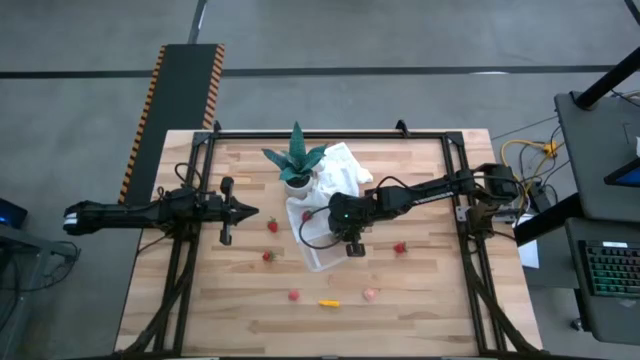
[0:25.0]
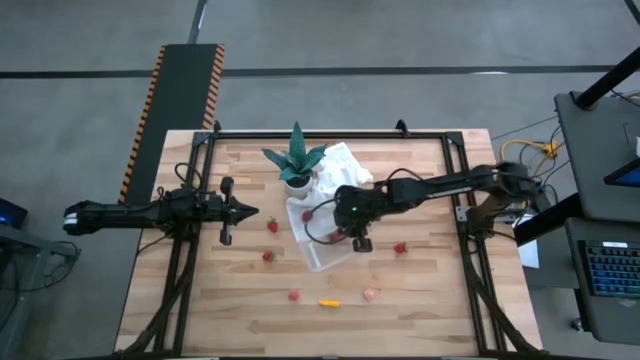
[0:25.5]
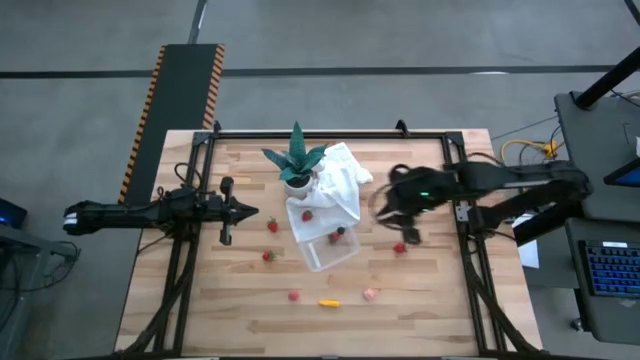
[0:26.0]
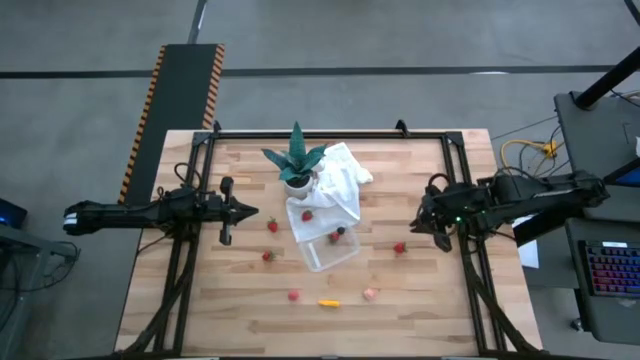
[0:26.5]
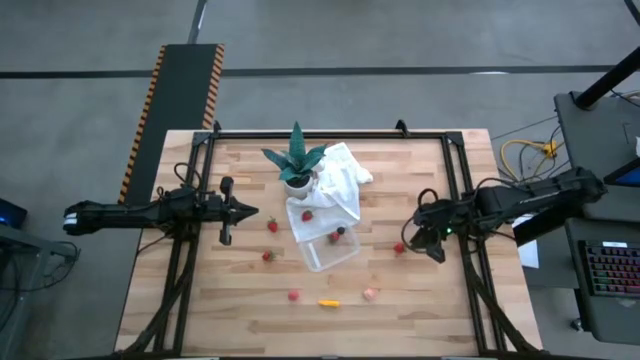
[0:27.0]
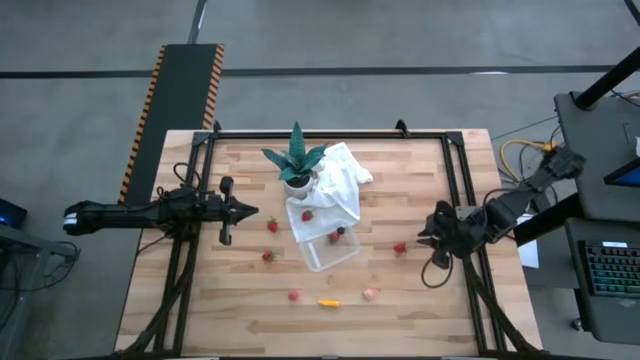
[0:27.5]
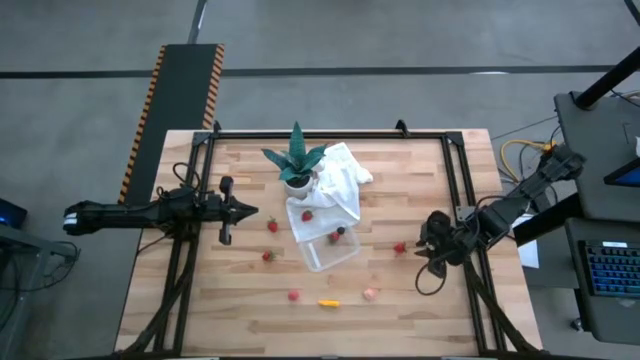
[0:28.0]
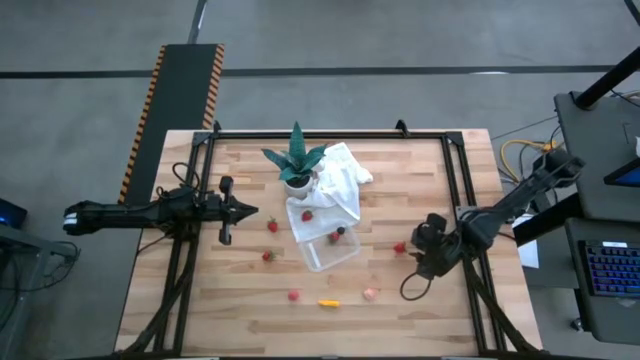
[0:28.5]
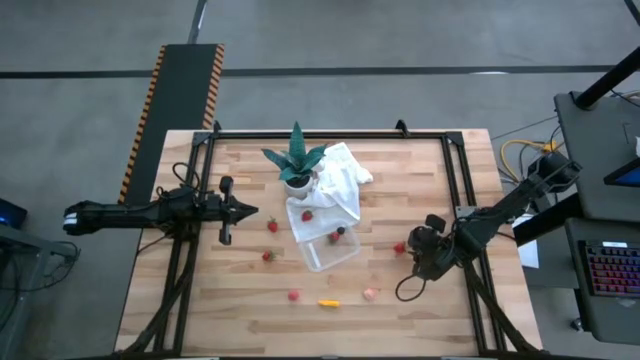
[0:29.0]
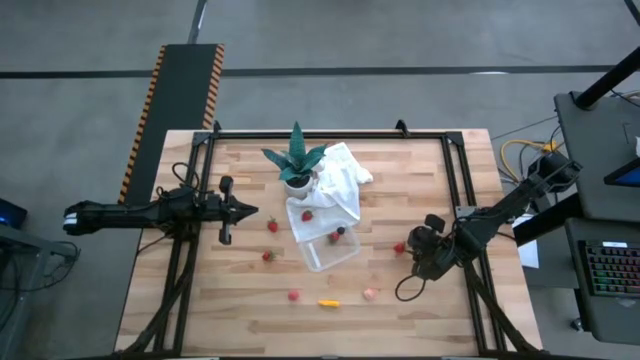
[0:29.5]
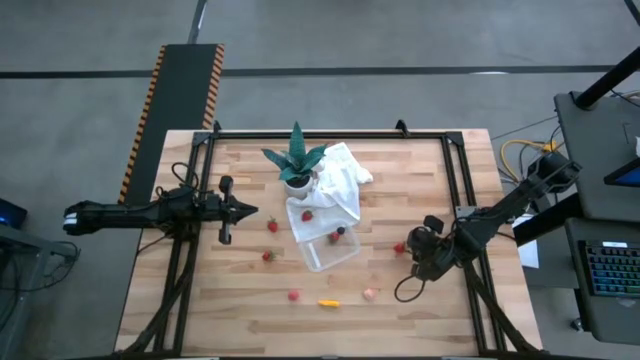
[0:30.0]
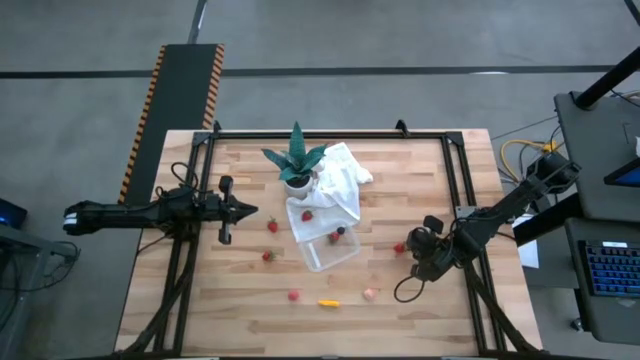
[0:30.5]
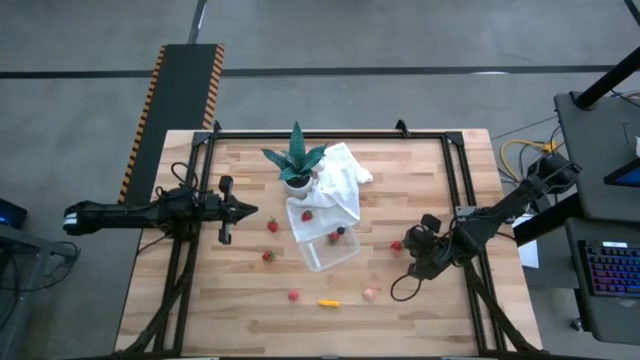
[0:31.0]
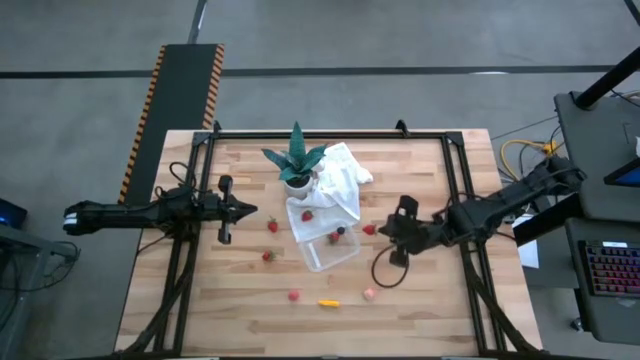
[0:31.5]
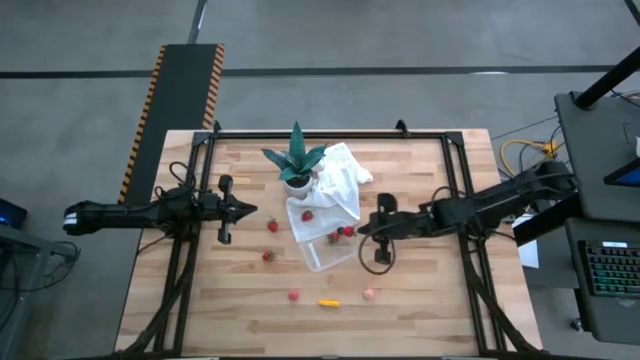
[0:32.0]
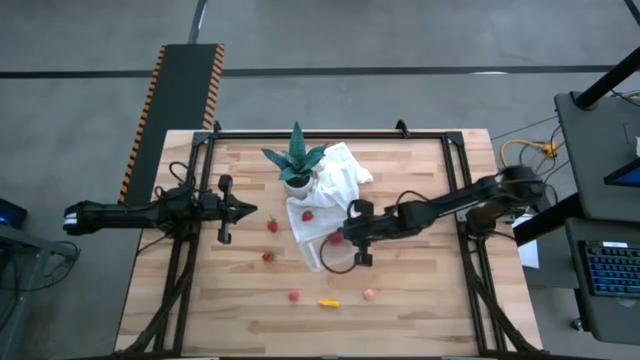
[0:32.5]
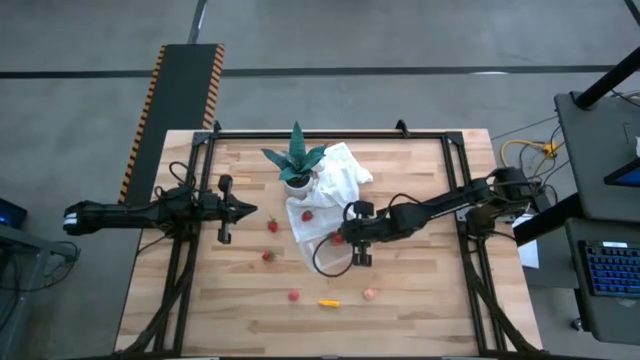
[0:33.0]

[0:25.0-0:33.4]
Task: Pick and placing Produce into tupperware
Put the strawberry into the transparent bin

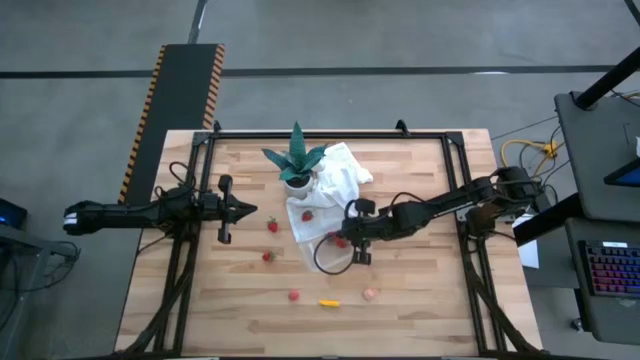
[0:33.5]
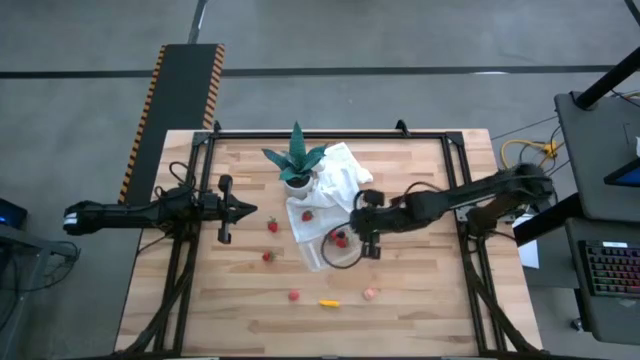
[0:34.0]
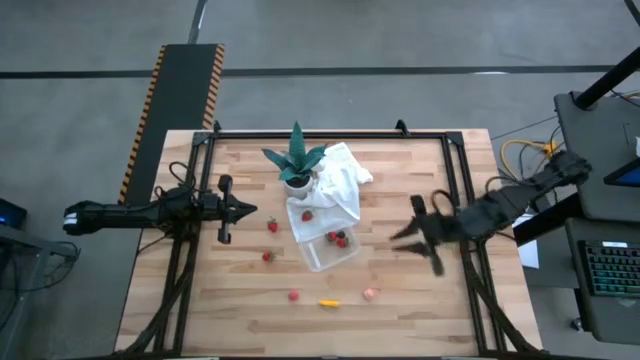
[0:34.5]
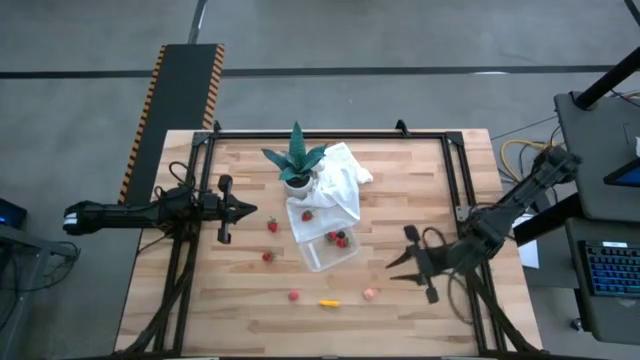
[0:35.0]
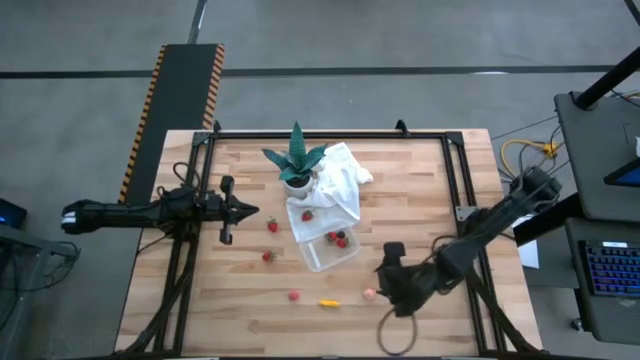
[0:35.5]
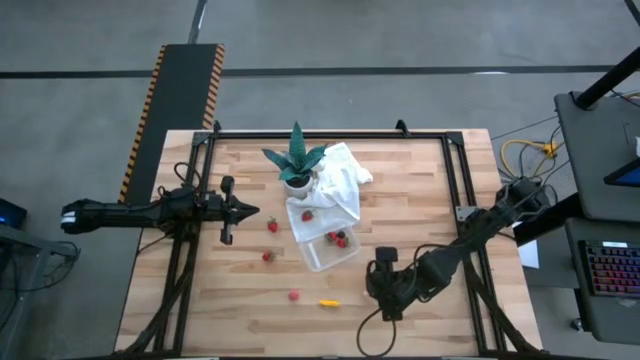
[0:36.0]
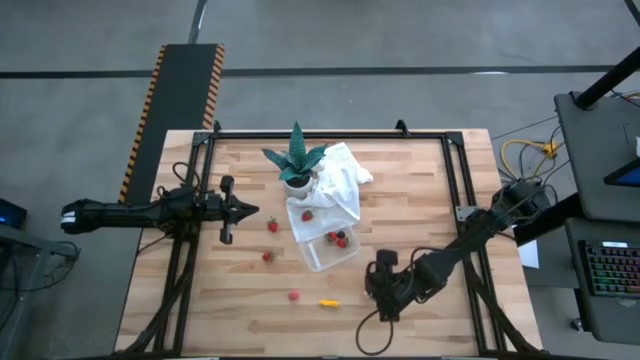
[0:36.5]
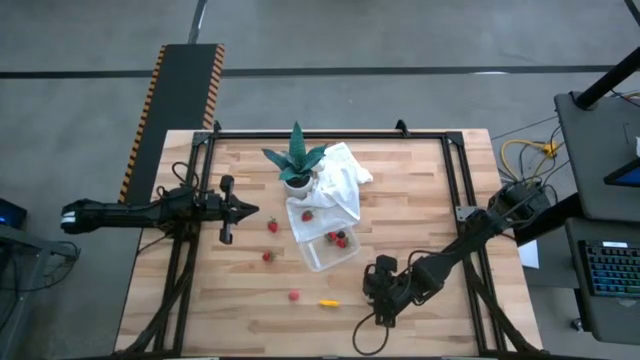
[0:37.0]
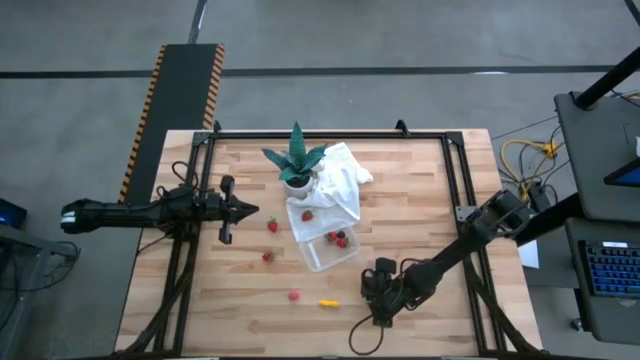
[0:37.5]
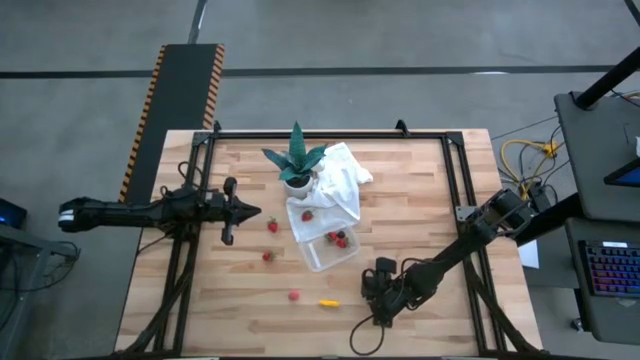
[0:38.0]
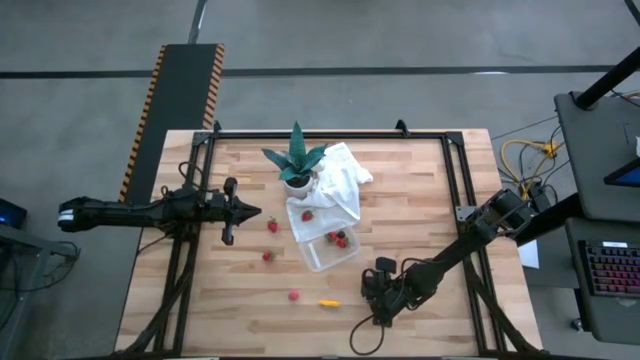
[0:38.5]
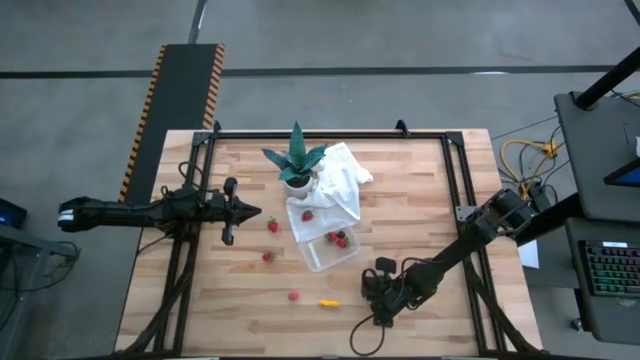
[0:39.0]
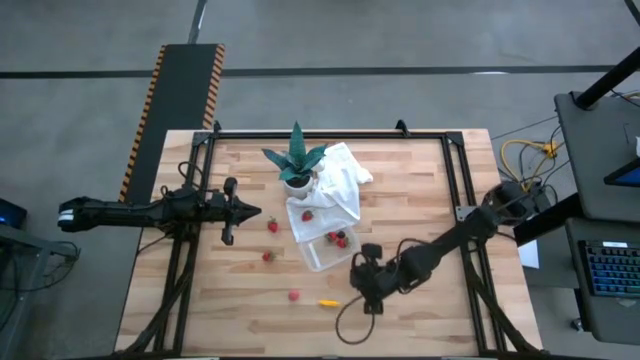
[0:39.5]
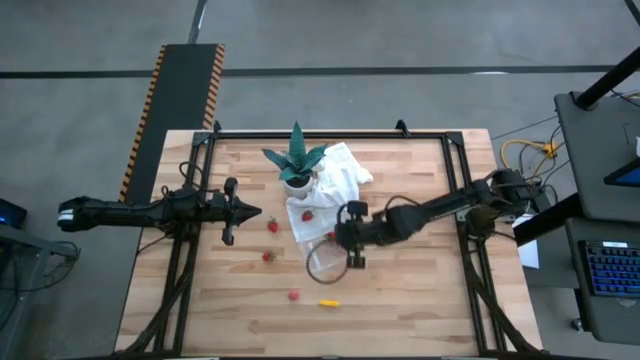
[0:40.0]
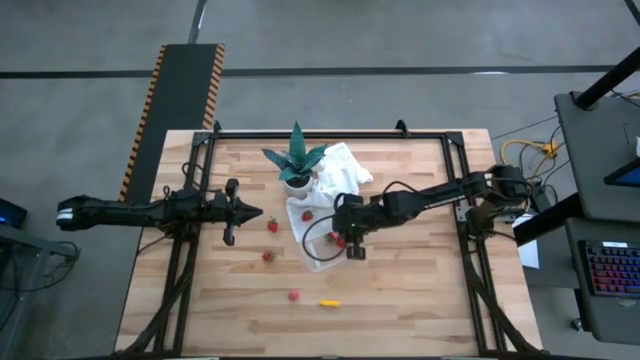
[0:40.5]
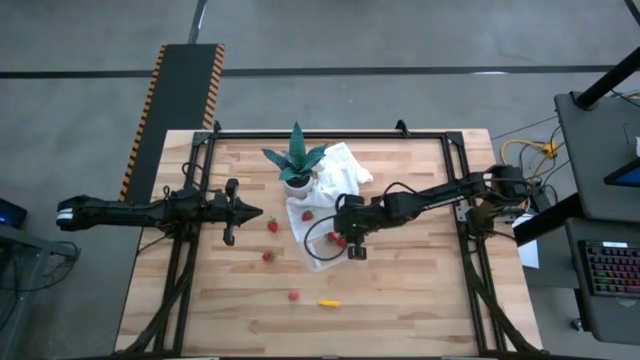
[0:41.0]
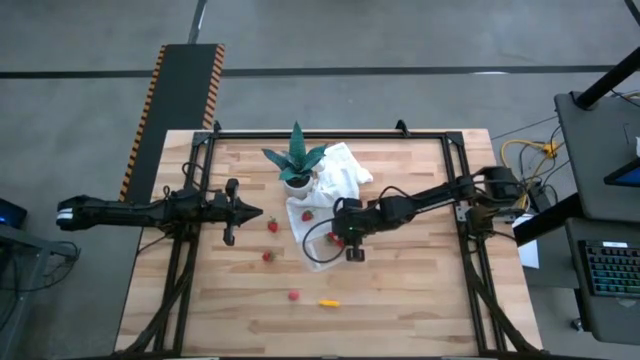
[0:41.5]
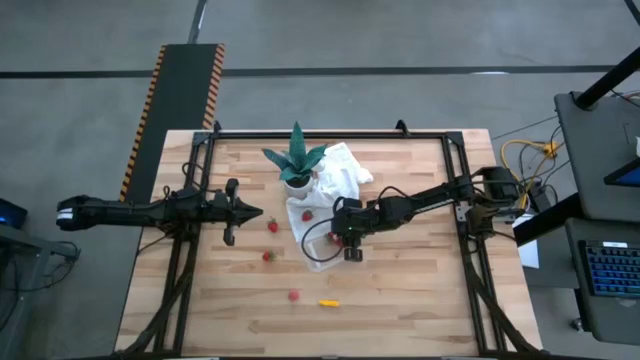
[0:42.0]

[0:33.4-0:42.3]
Put the apricot into the transparent bin

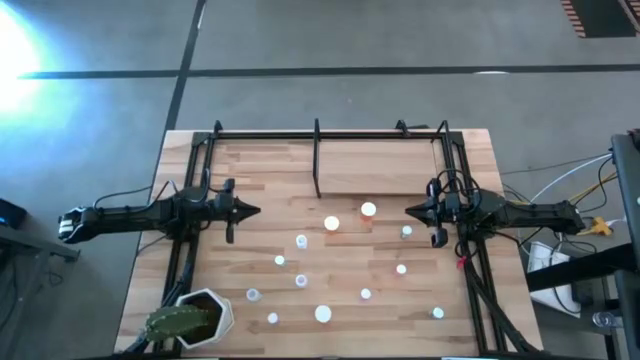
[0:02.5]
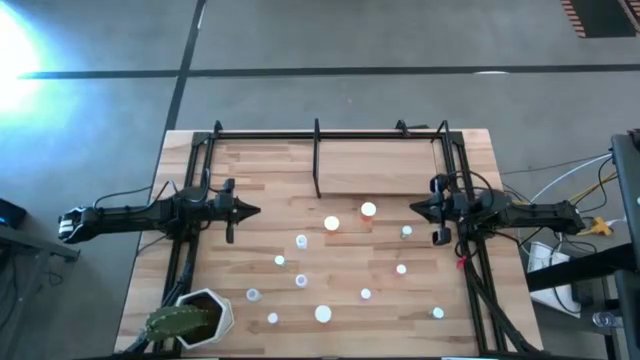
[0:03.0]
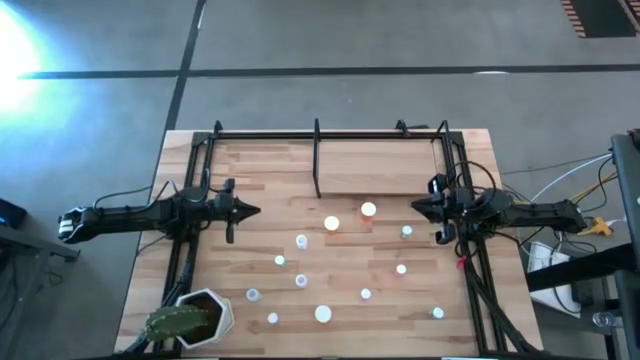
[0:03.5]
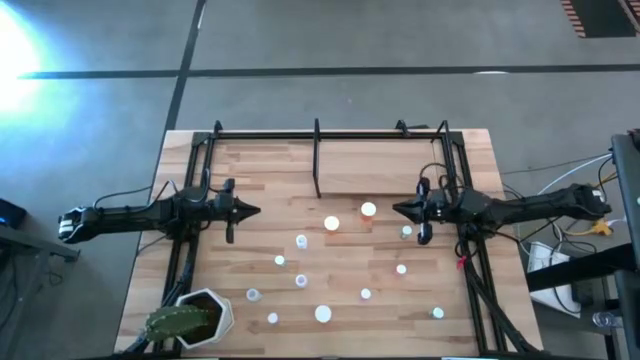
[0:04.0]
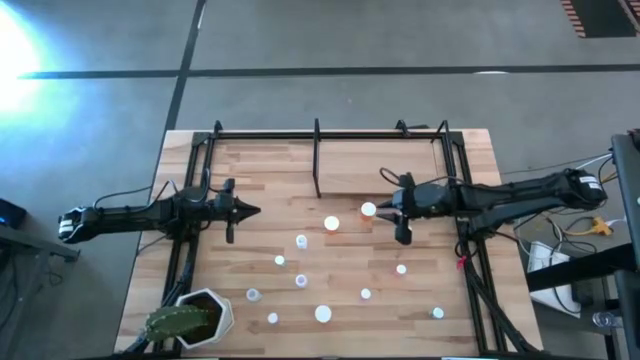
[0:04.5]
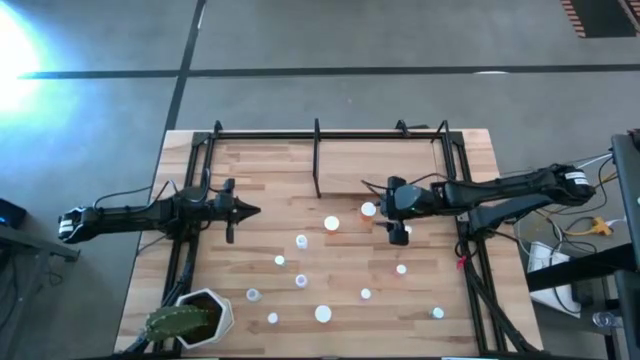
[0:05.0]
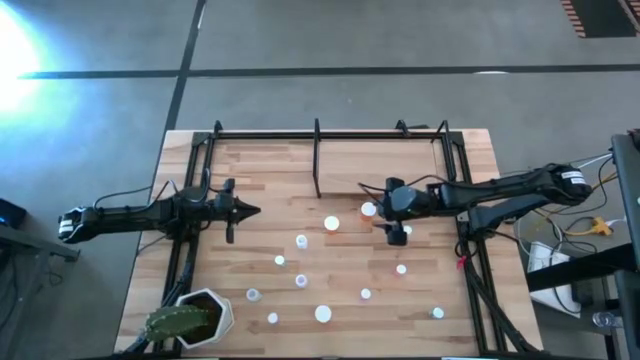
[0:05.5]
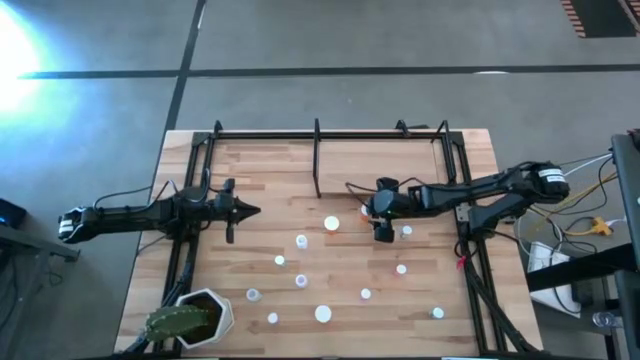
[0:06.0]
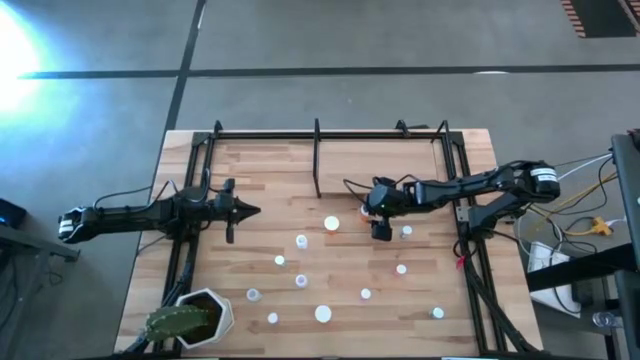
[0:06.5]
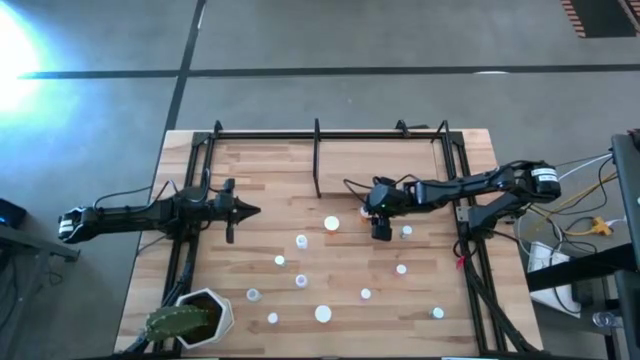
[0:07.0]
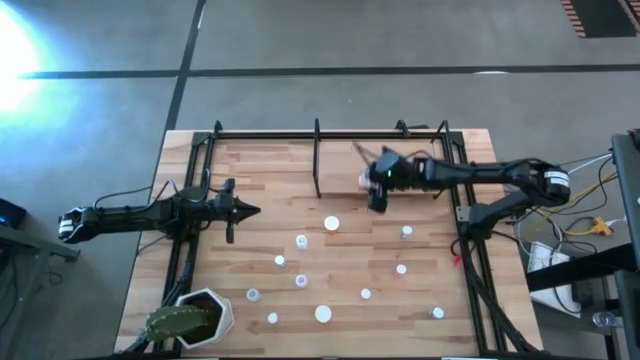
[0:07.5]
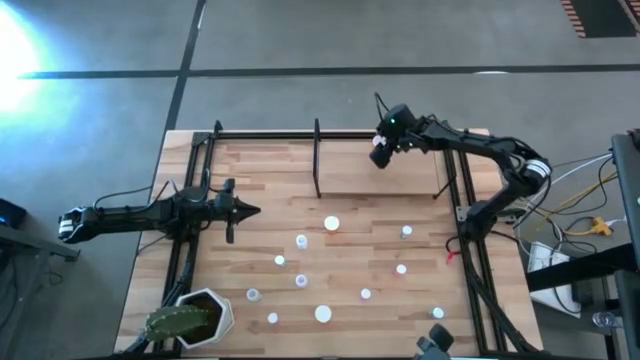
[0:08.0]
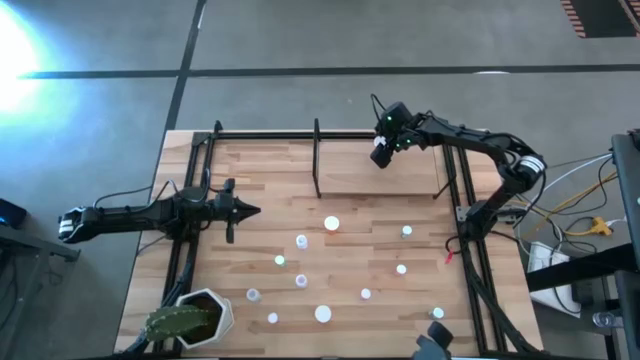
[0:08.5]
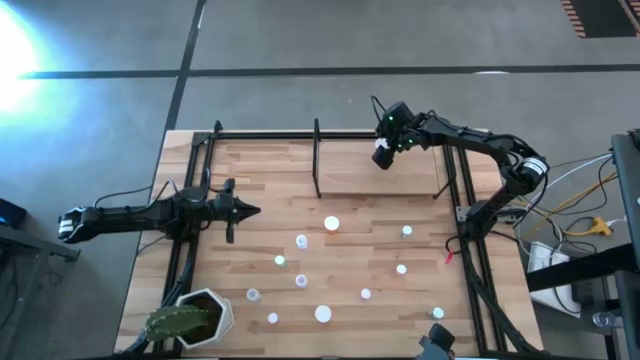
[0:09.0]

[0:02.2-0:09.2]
Task: Pick and place medicine bottles onto shelf by color
Put the top orange pill bottle on the shelf
